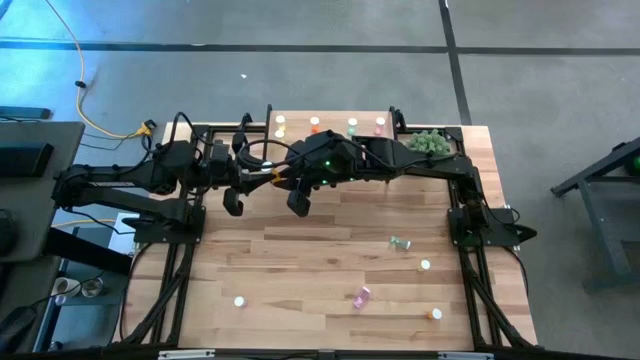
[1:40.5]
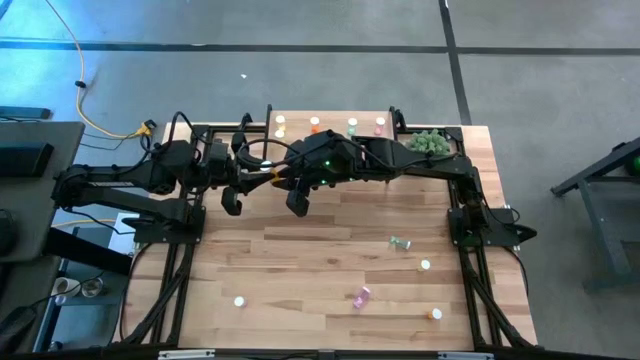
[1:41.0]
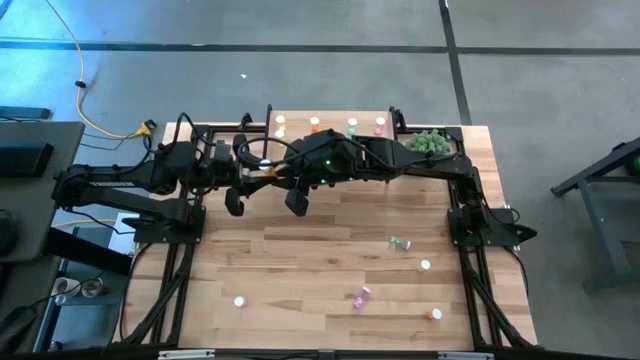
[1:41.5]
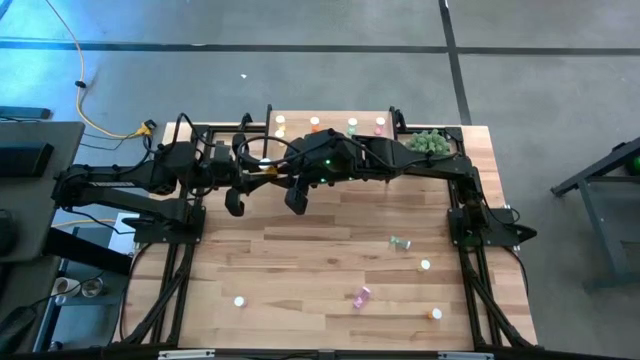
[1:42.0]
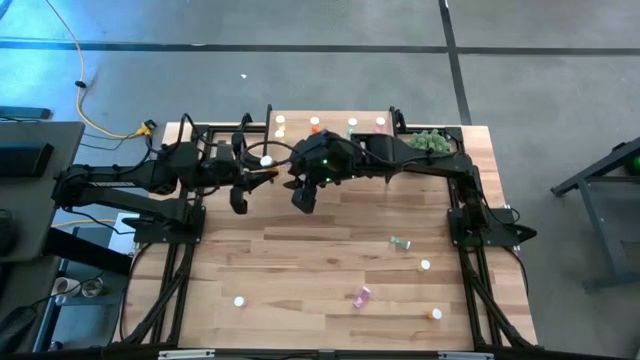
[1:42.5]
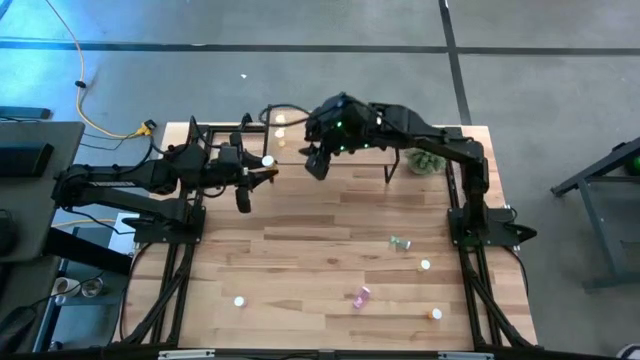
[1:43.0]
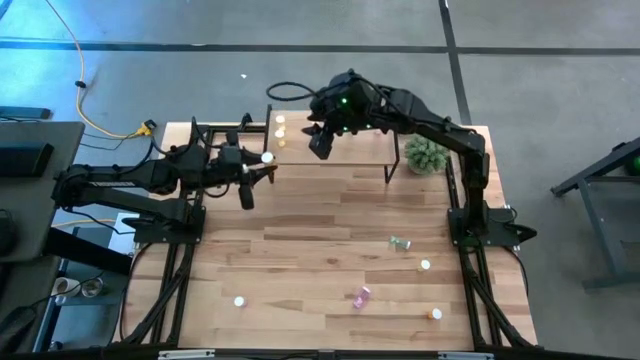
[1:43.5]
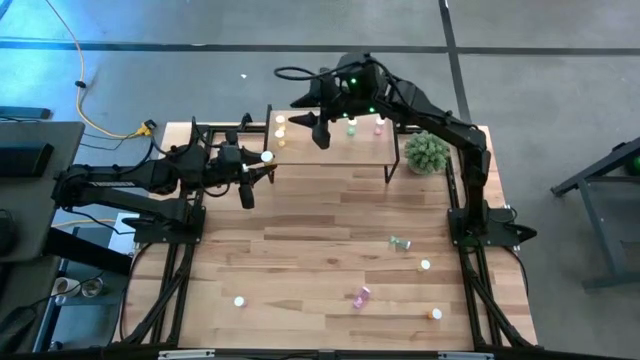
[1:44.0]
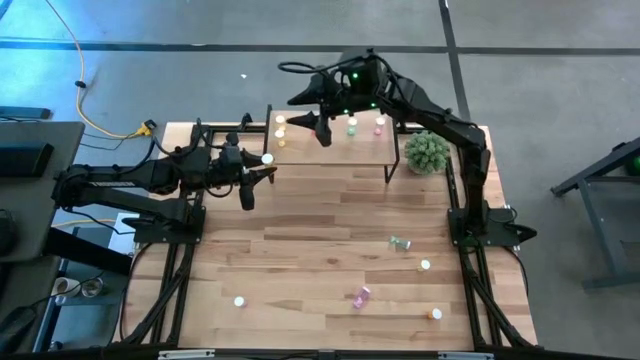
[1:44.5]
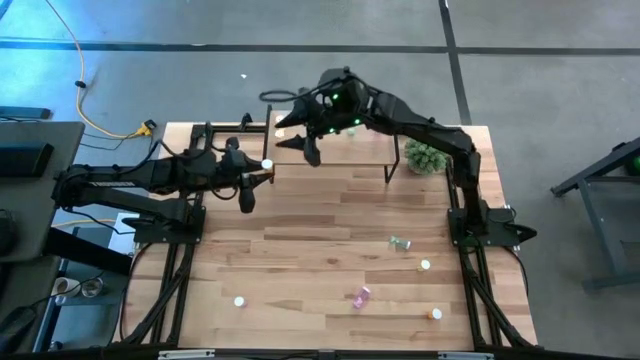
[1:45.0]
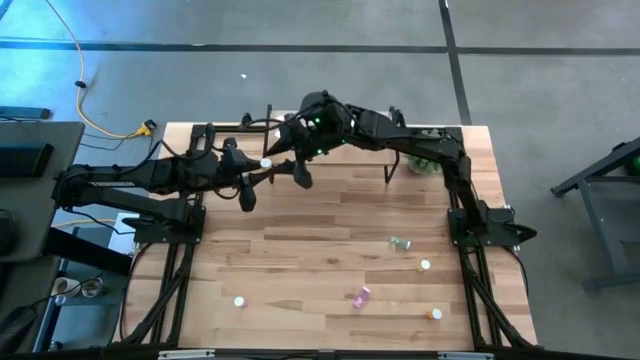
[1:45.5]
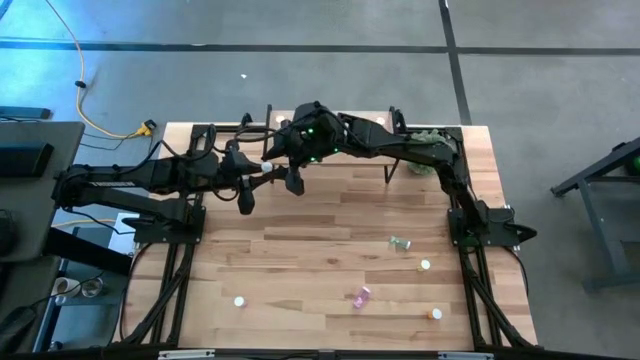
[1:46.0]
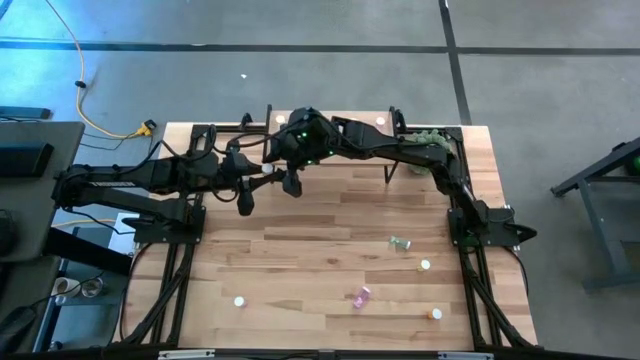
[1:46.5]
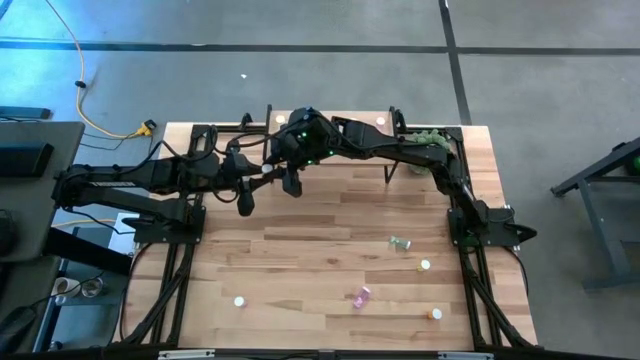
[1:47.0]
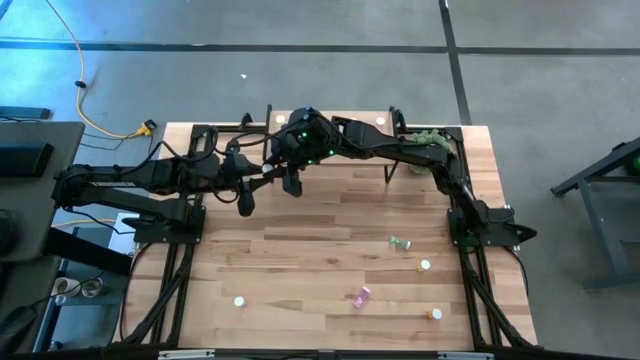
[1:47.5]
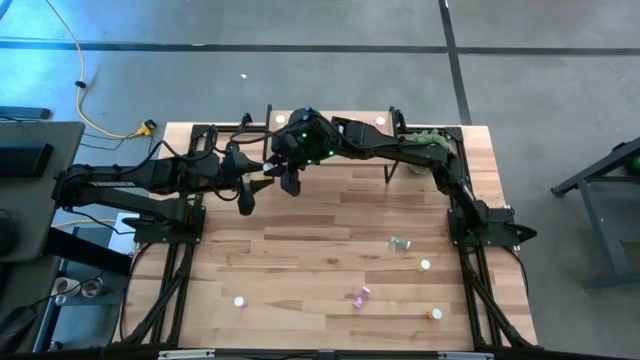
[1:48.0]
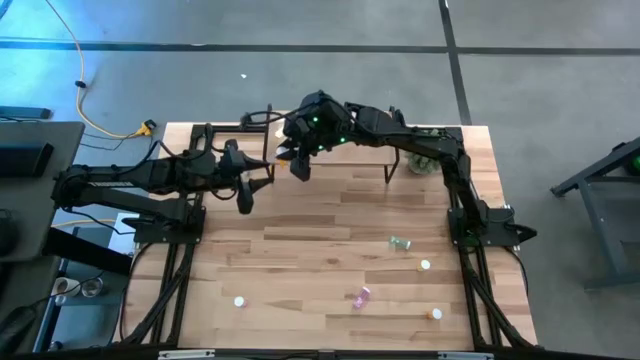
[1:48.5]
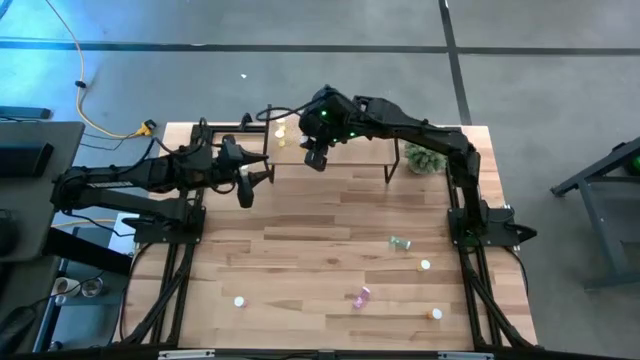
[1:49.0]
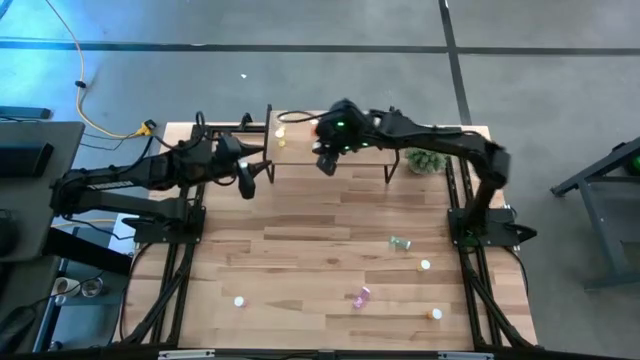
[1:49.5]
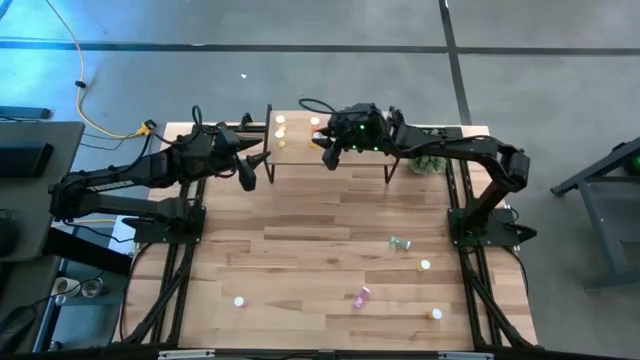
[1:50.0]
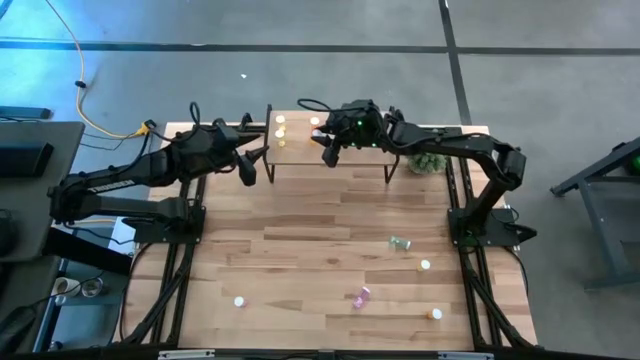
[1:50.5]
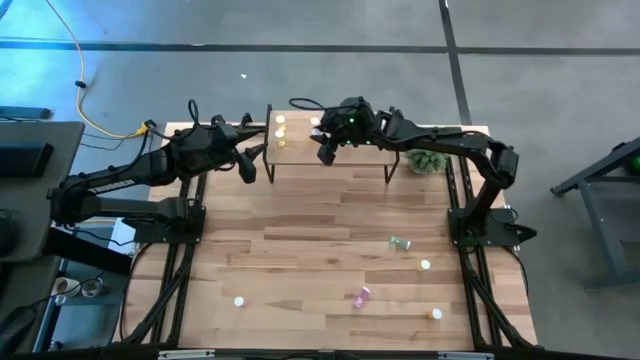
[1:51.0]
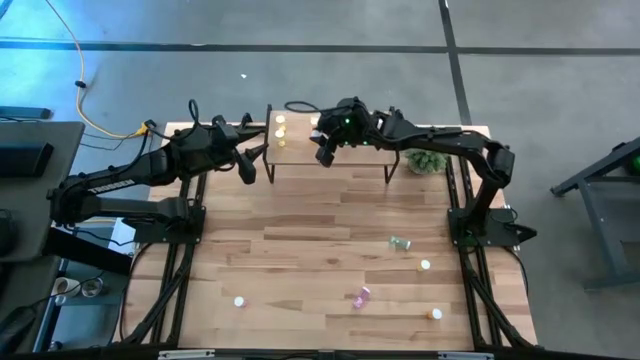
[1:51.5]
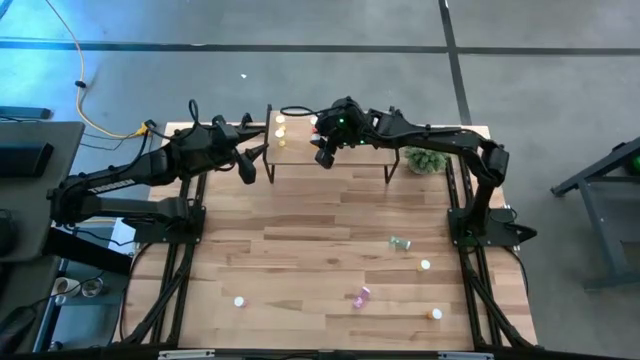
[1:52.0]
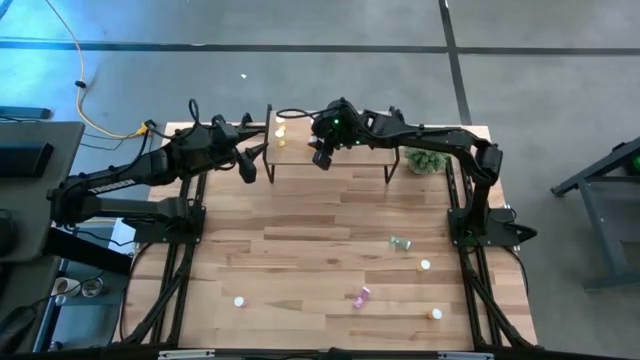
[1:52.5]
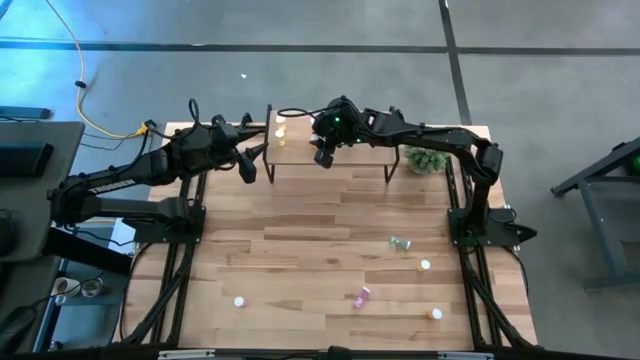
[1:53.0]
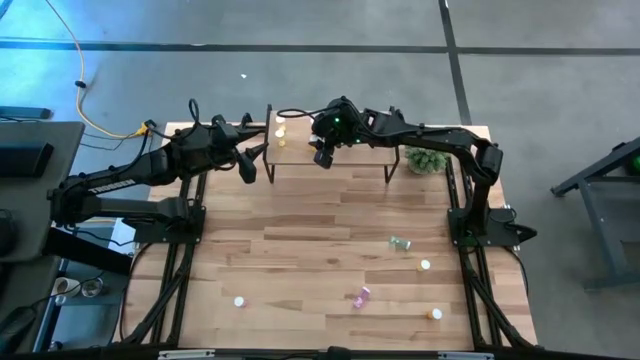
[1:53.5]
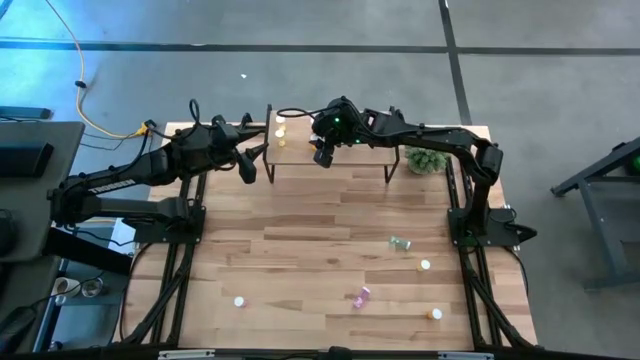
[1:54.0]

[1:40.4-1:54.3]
Task: Pick and place medicine bottles onto shelf by color
Put the left orange pill bottle on the shelf aligned with the other orange pill bottle

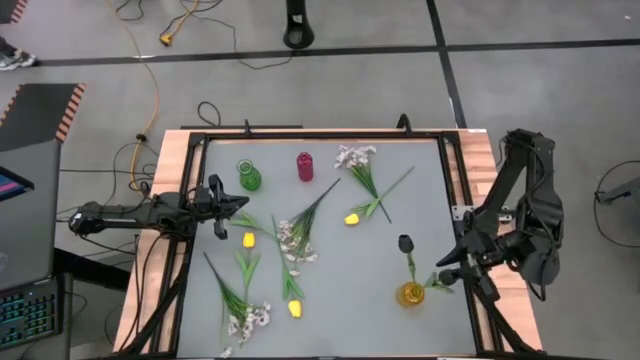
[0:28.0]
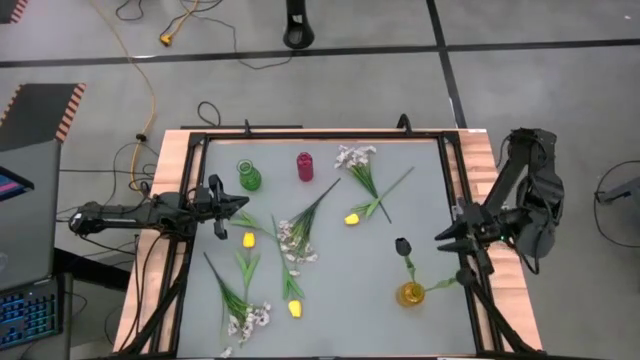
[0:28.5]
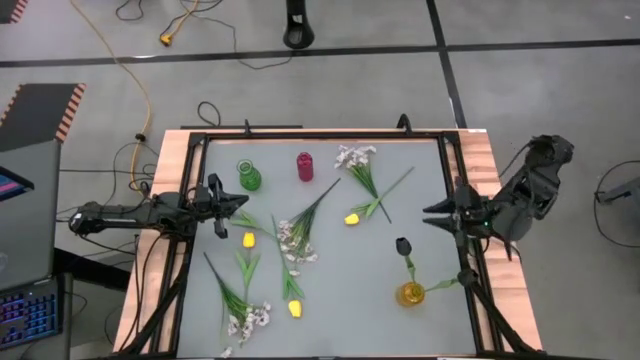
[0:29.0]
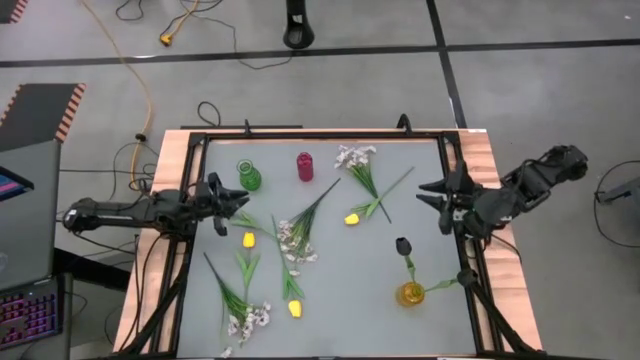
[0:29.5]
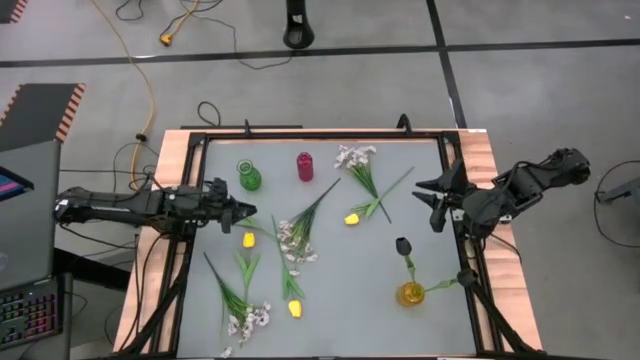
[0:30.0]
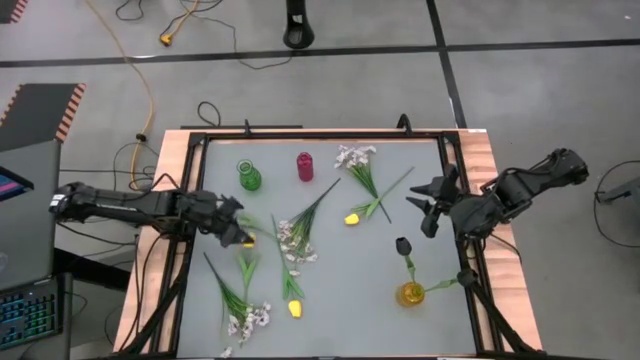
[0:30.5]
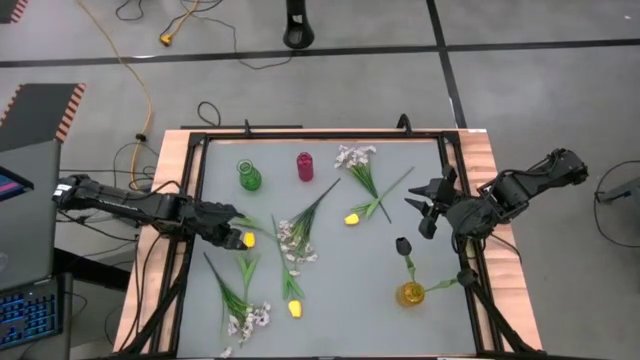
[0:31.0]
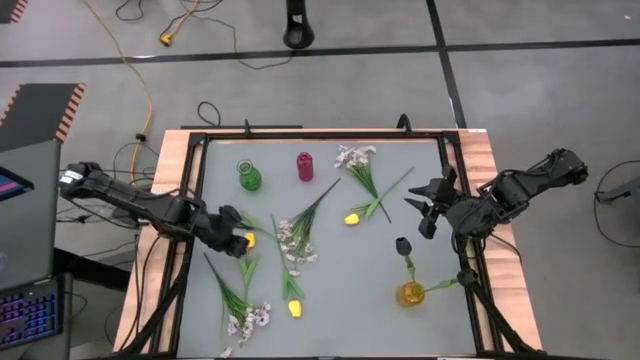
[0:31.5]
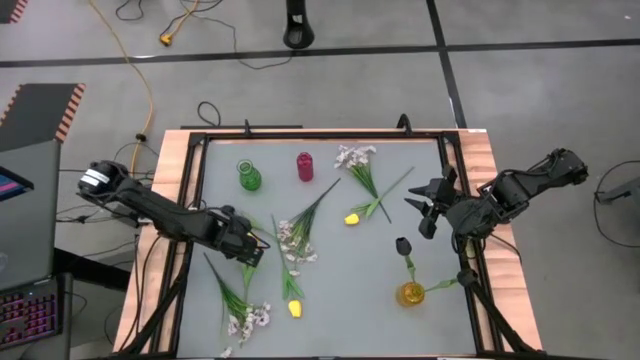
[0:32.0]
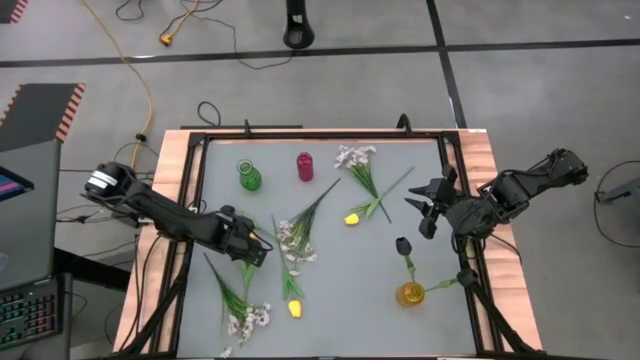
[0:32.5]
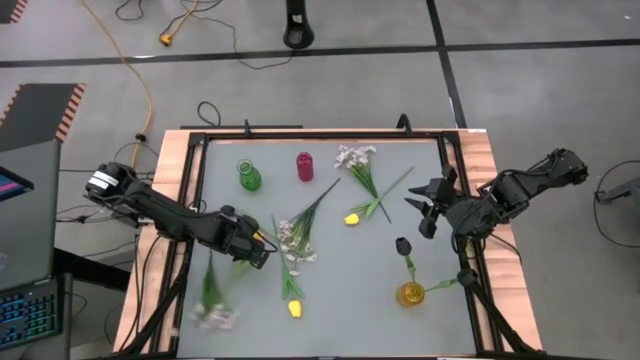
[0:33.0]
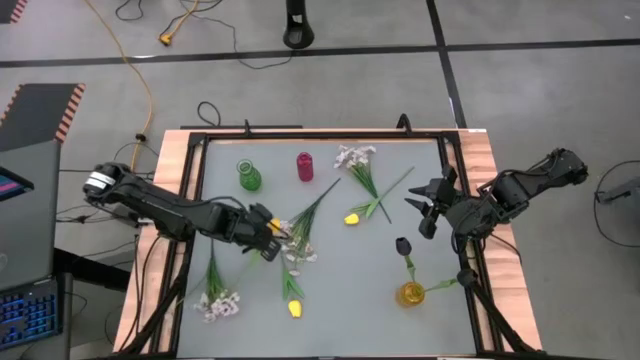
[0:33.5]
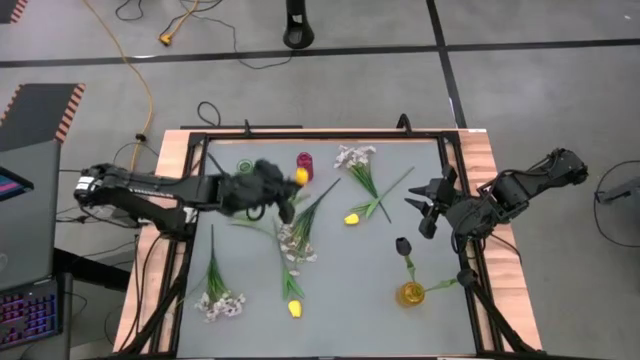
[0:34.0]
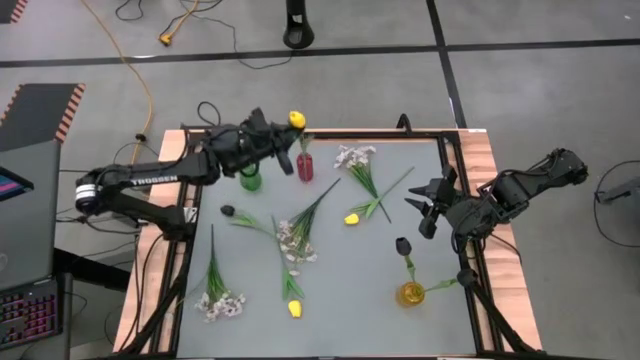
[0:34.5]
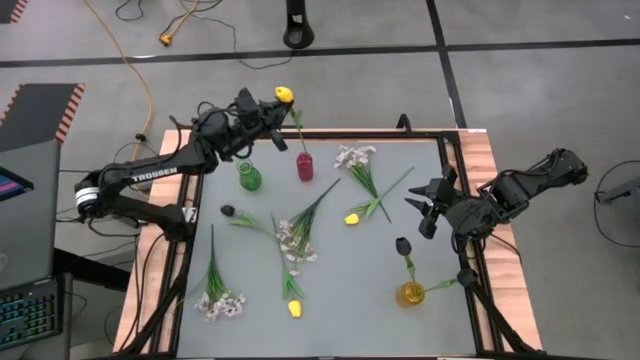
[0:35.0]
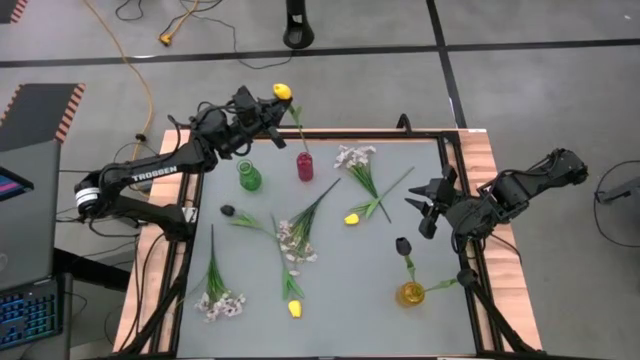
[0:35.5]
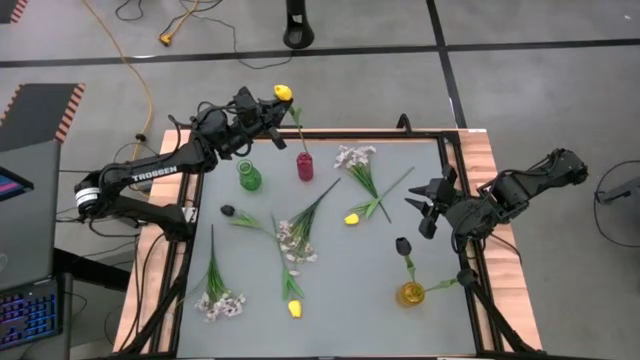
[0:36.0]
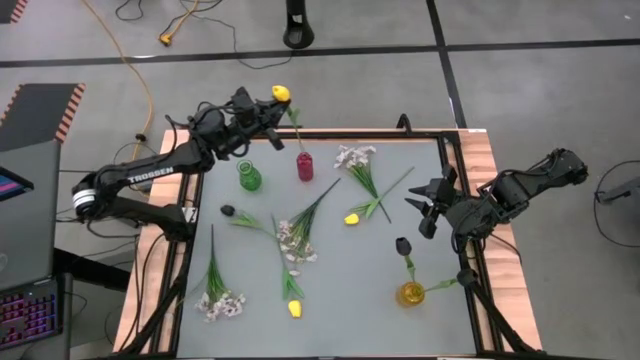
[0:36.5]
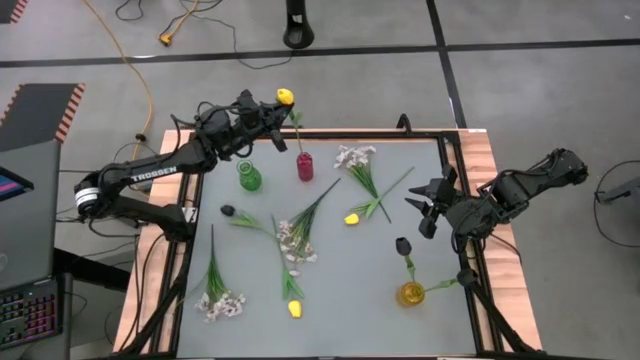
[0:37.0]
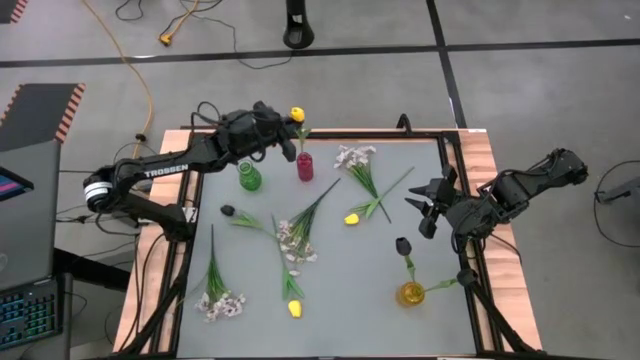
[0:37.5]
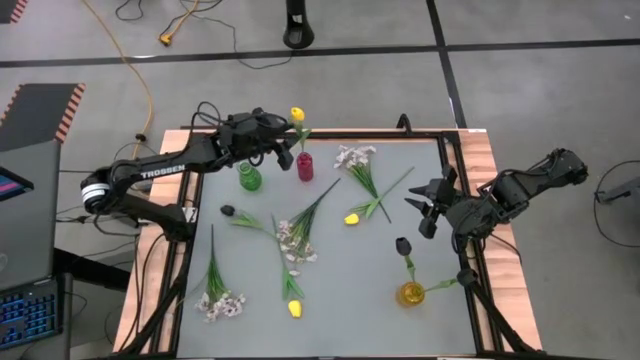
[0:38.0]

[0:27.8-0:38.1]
Task: Sort flowers into vase by color
Put the top left yellow tulip into the red vase
